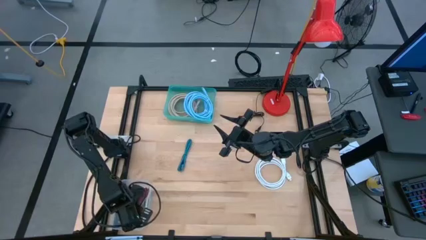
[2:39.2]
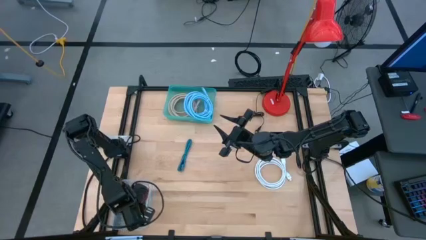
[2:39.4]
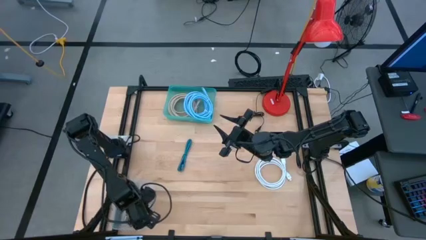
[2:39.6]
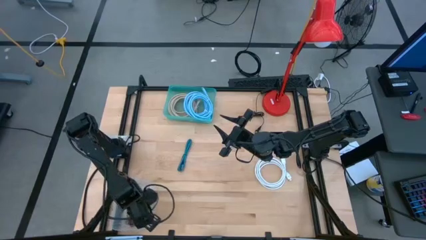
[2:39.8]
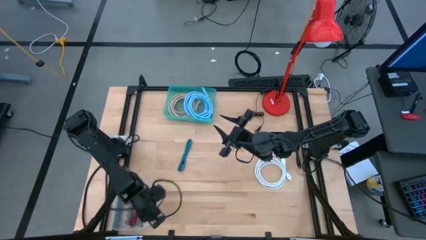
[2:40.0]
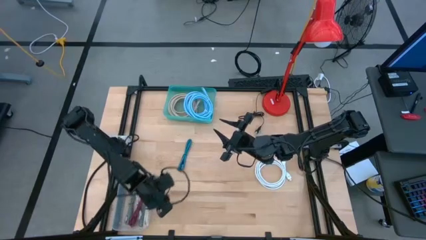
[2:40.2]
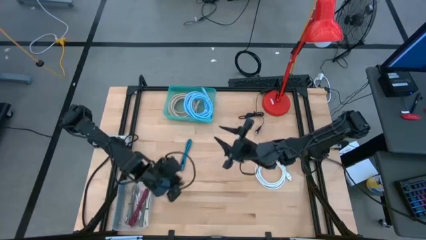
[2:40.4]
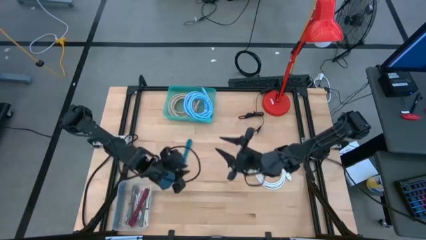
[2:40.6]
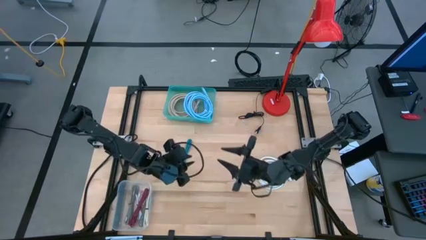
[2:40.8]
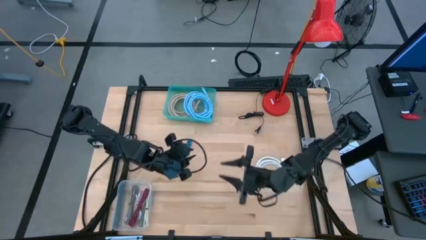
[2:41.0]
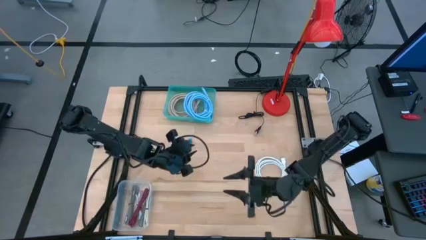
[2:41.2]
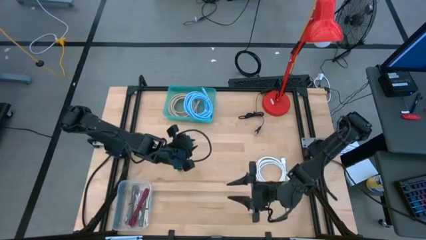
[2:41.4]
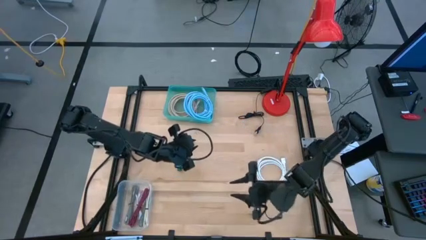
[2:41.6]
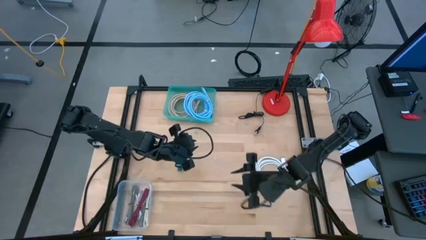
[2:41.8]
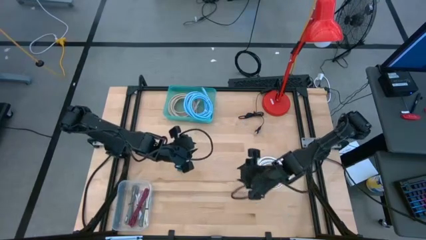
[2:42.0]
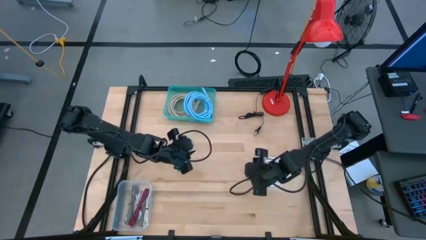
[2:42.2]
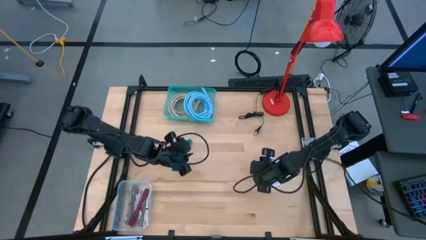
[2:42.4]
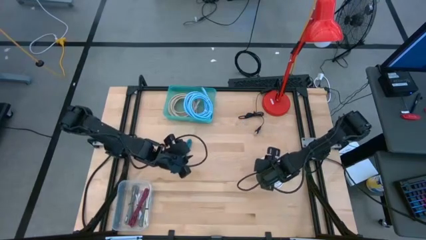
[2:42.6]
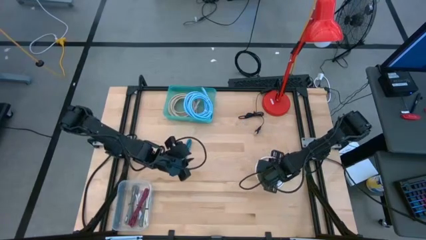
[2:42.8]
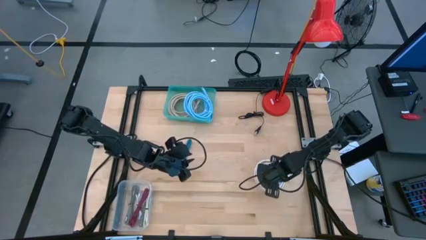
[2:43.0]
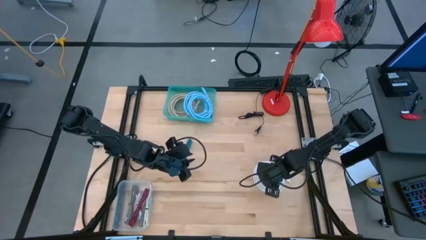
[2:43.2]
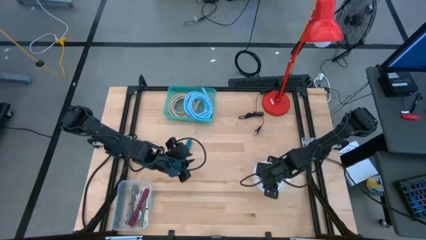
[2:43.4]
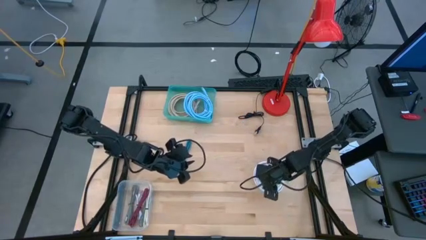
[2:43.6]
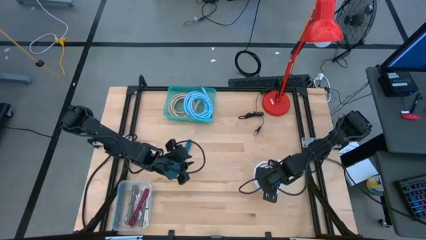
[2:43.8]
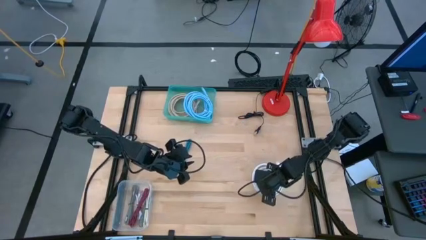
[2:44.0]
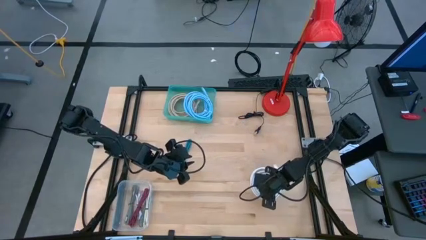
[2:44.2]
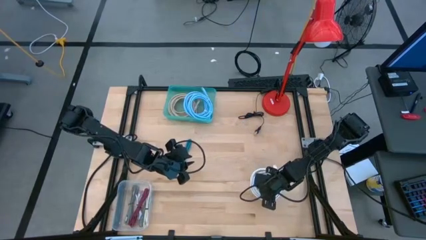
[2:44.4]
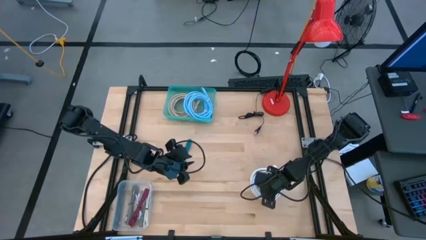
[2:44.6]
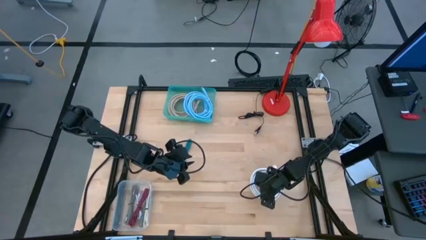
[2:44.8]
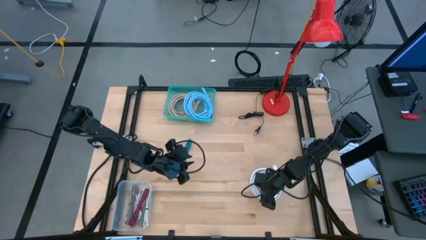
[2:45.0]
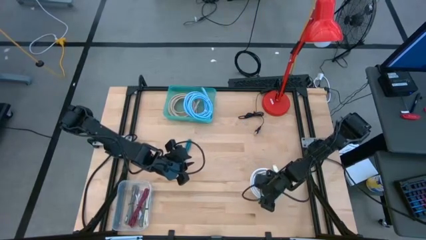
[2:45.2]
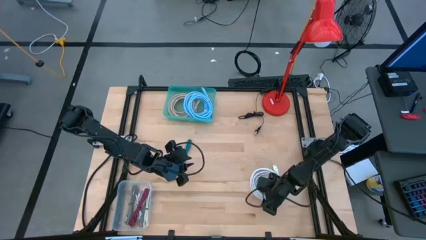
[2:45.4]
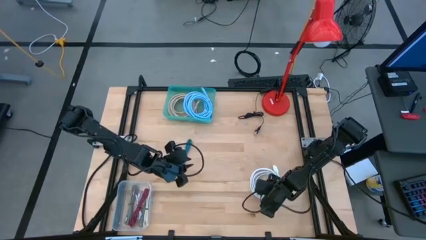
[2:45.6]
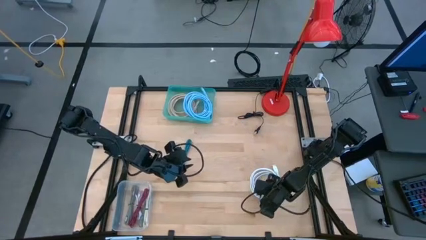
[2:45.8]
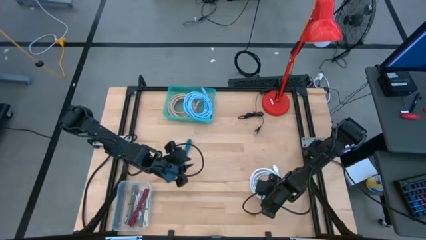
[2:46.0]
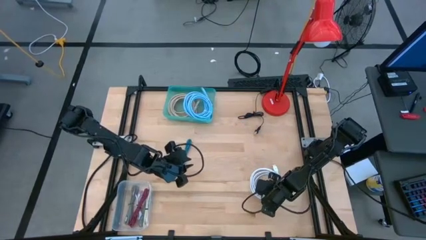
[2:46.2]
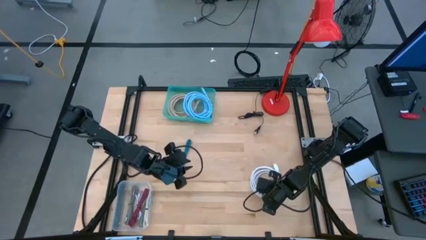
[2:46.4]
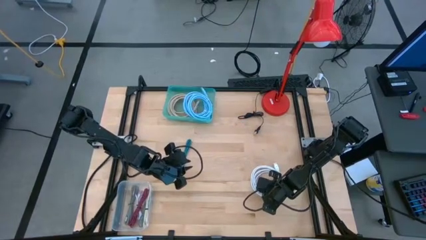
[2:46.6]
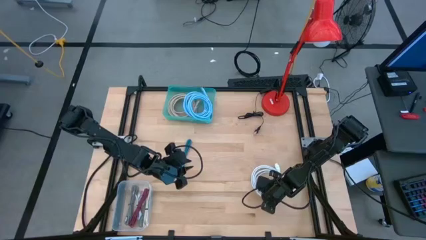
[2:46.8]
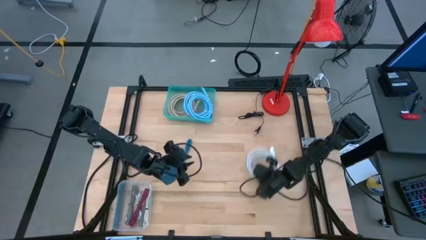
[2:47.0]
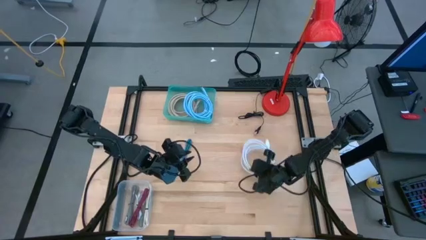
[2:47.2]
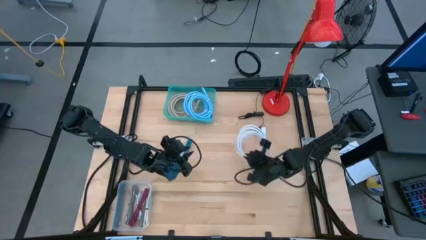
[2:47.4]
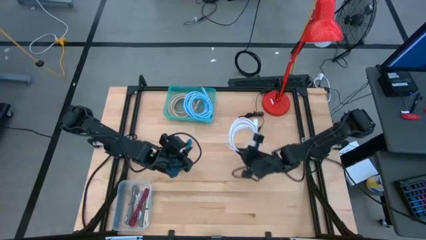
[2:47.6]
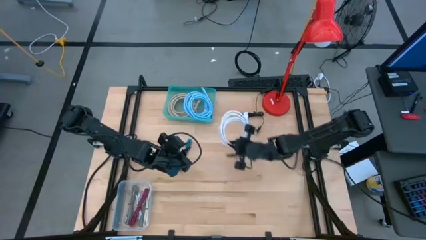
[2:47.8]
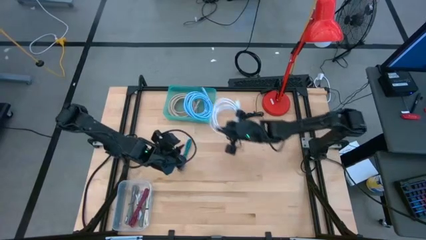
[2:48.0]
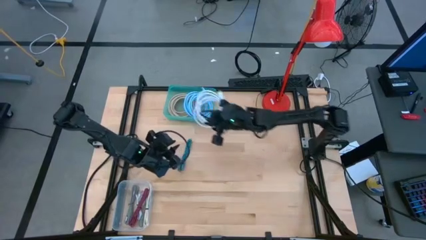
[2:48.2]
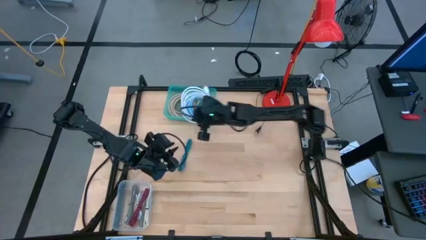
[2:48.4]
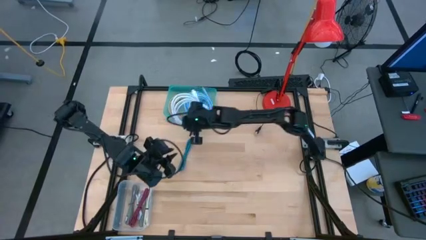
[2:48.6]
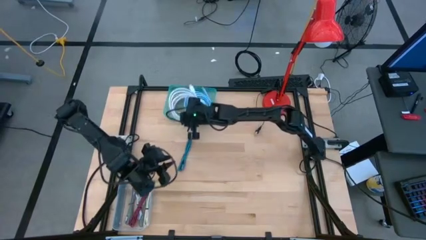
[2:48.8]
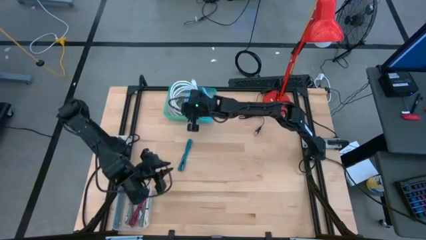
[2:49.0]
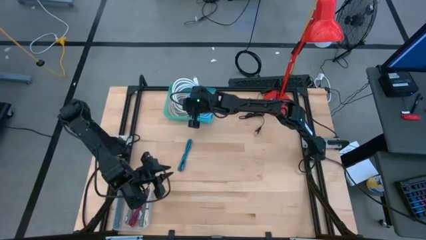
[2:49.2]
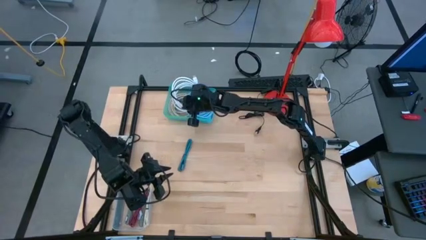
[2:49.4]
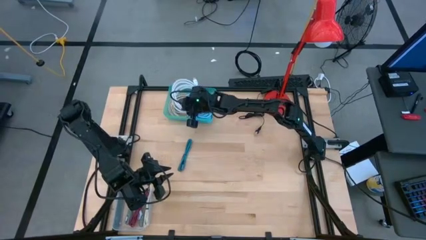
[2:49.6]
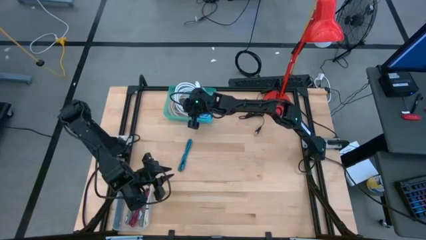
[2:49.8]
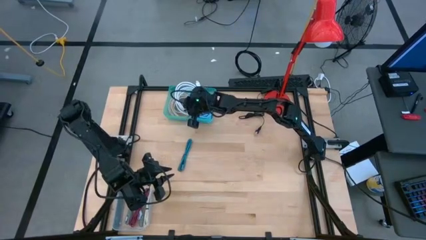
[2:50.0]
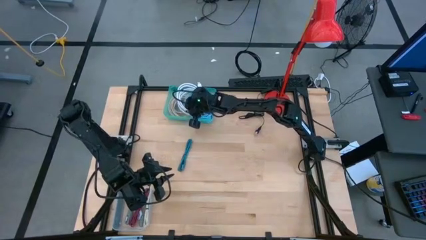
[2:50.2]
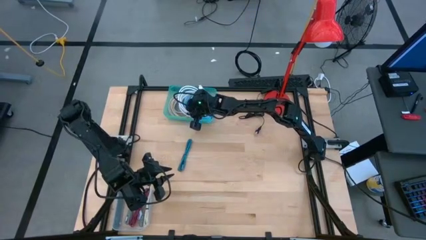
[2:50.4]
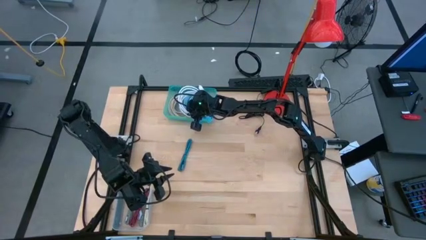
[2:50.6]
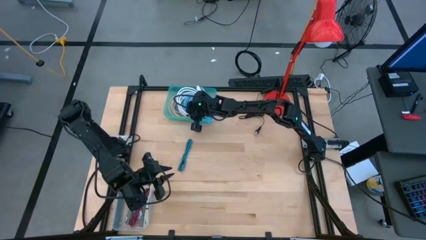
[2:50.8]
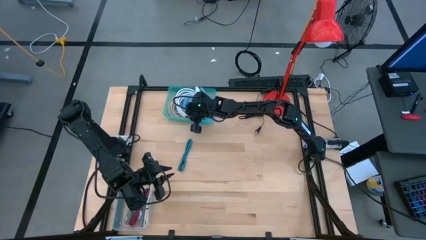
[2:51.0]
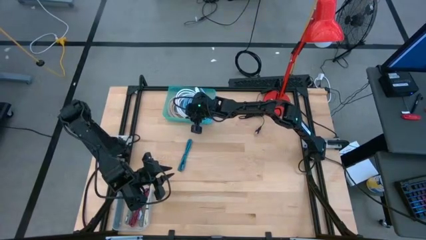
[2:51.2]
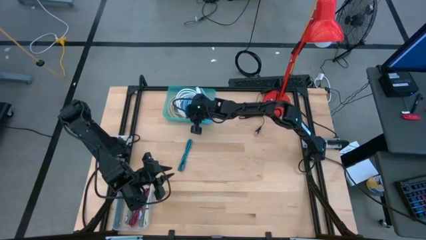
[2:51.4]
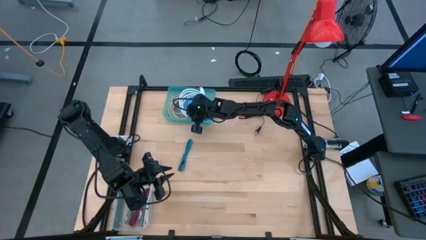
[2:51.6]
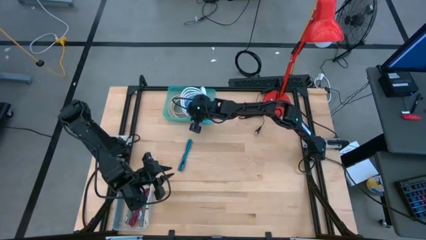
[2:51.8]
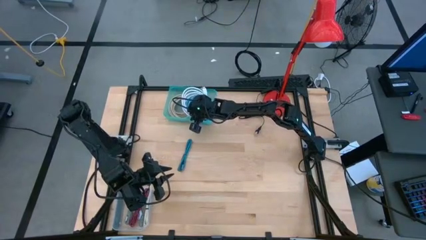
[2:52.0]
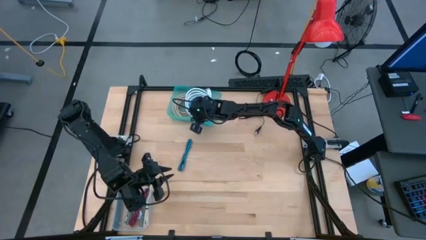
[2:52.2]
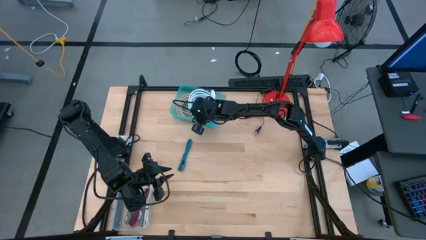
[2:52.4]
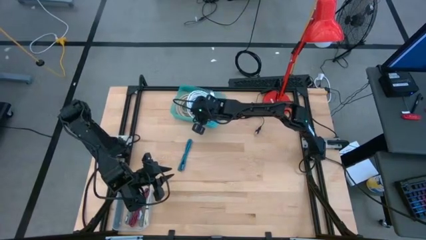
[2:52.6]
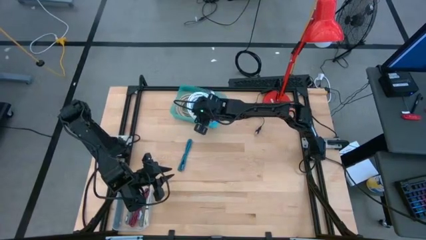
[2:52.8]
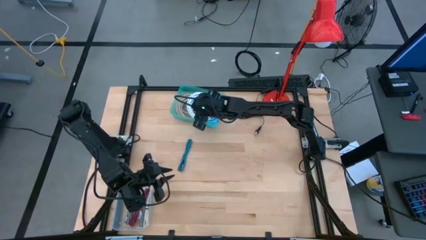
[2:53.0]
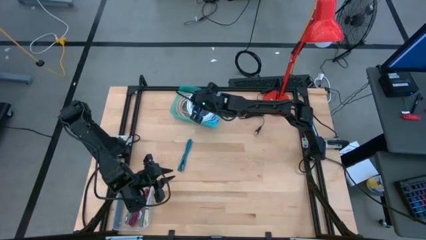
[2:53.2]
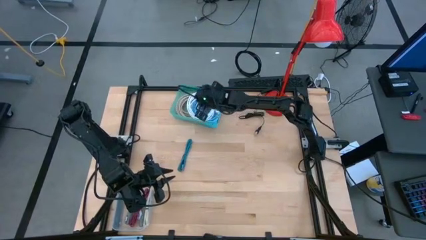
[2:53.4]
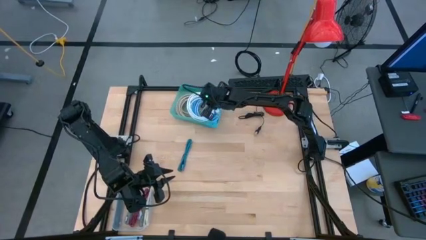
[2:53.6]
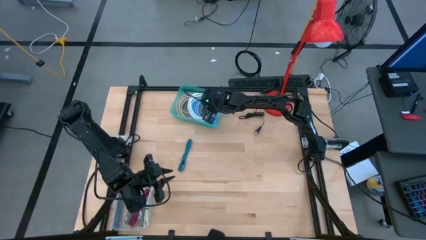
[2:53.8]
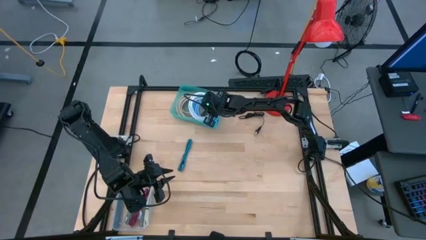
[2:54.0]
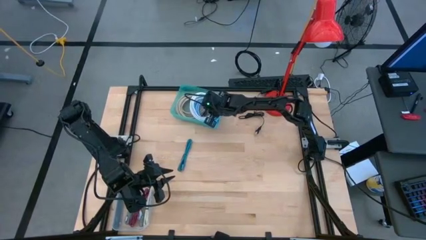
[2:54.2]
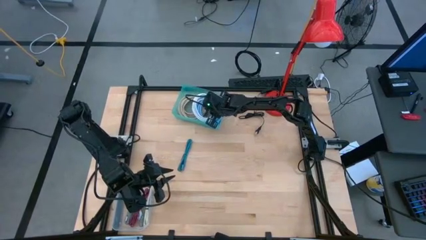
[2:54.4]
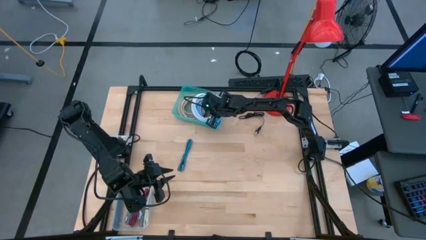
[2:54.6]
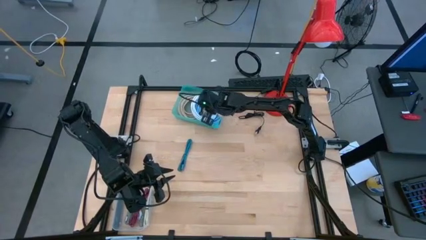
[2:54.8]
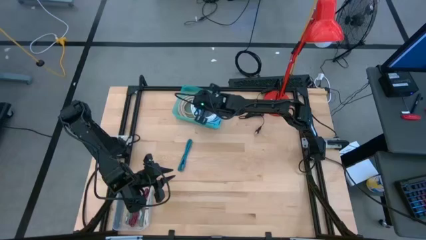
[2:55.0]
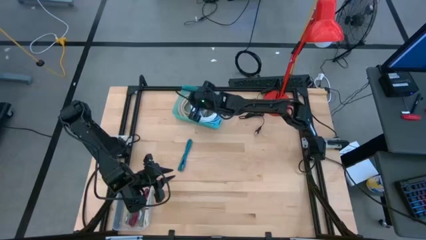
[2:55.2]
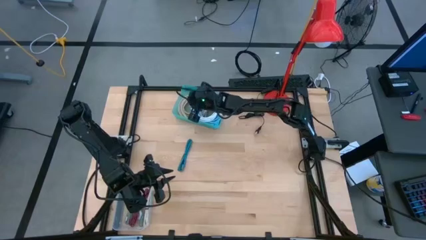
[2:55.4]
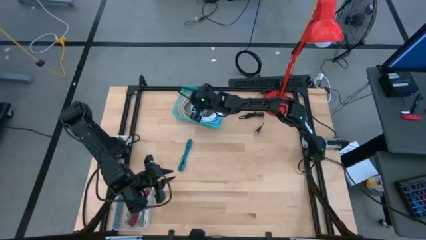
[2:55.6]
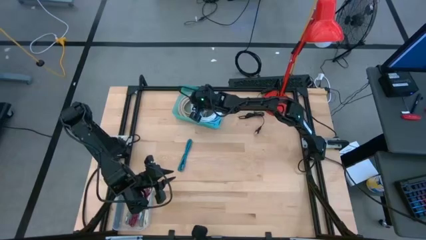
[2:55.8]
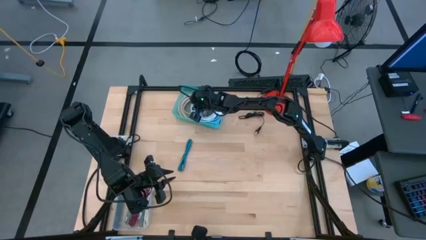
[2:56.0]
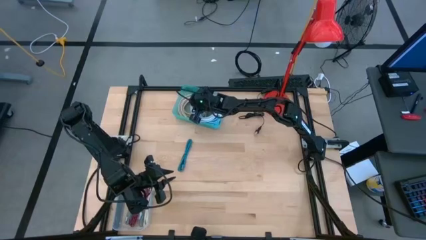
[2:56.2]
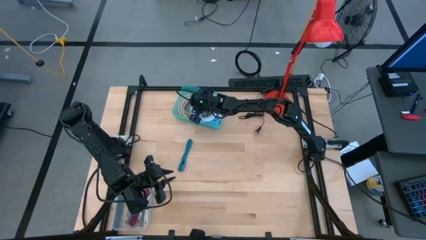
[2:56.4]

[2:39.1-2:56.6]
Task: Pick & Place USB Port
Put the white HDMI cable into the green bin
